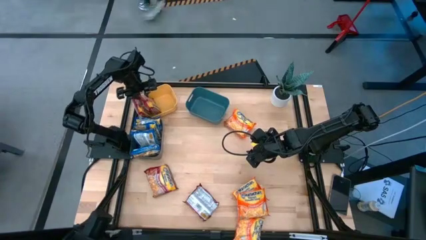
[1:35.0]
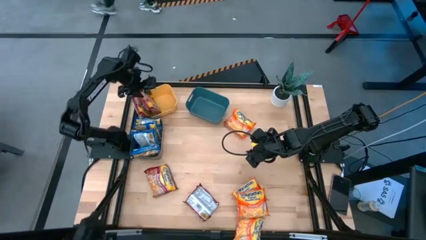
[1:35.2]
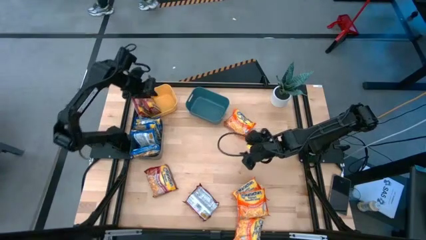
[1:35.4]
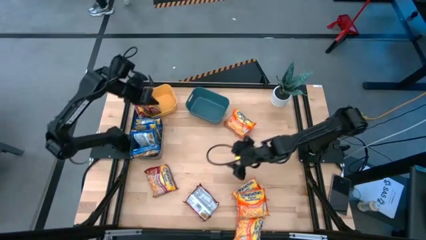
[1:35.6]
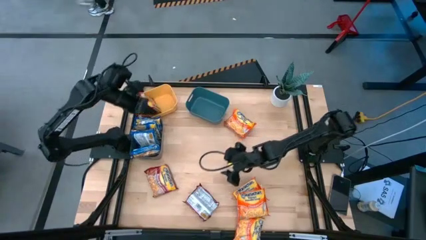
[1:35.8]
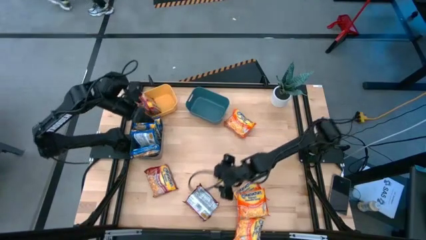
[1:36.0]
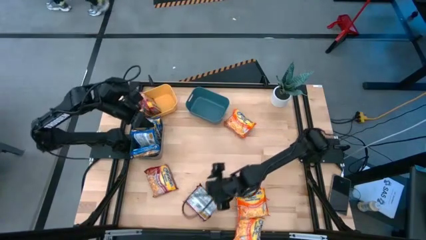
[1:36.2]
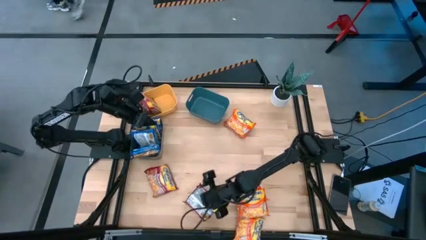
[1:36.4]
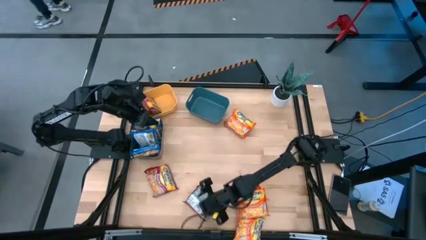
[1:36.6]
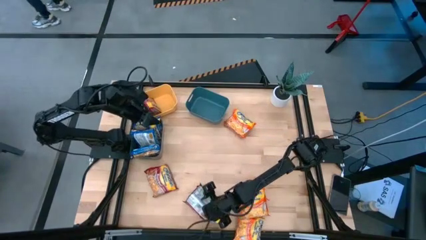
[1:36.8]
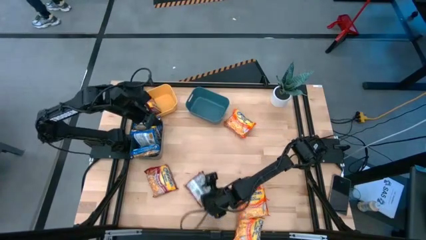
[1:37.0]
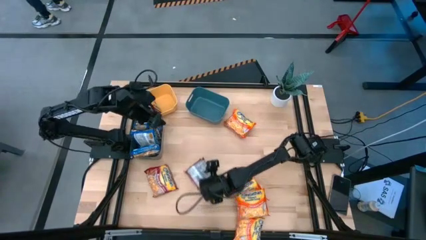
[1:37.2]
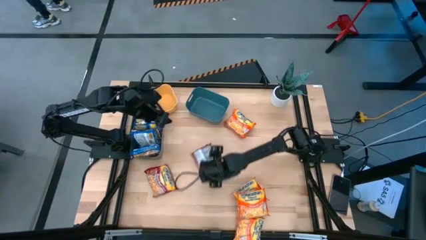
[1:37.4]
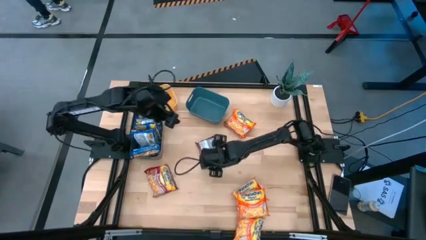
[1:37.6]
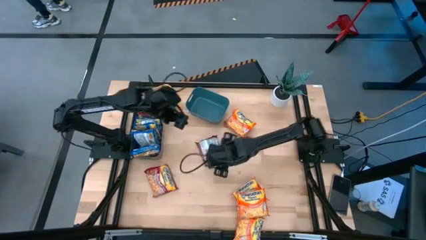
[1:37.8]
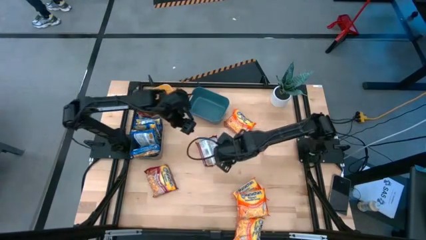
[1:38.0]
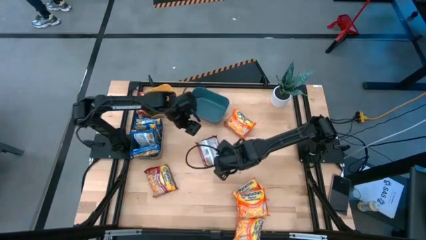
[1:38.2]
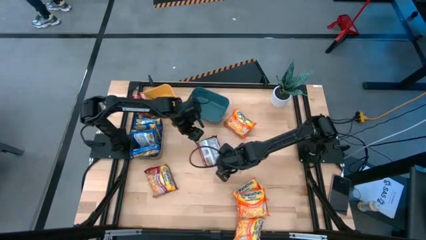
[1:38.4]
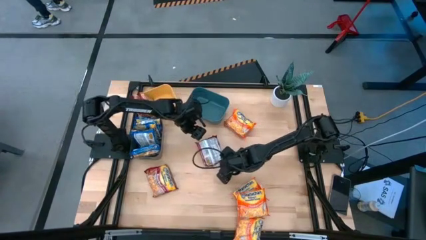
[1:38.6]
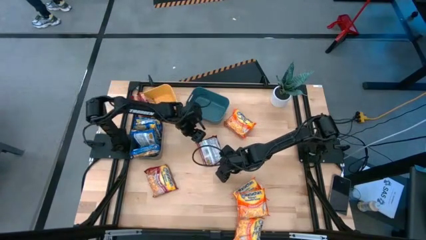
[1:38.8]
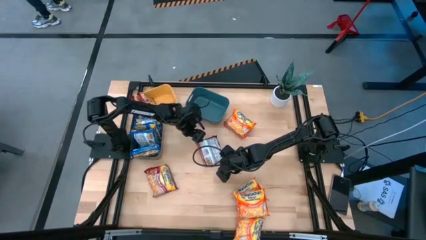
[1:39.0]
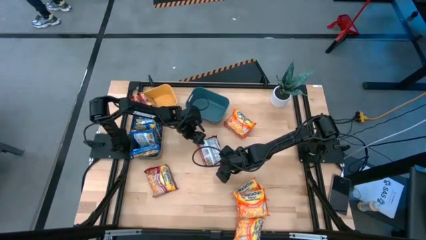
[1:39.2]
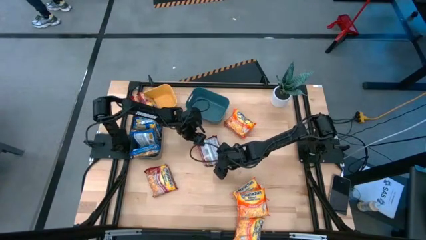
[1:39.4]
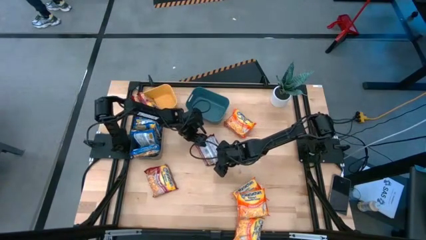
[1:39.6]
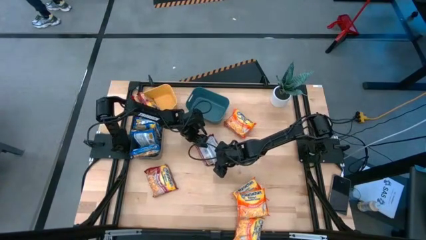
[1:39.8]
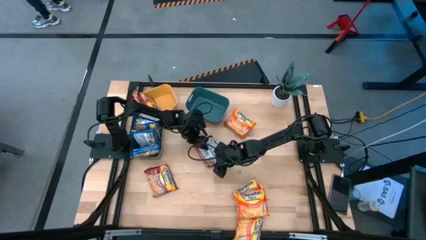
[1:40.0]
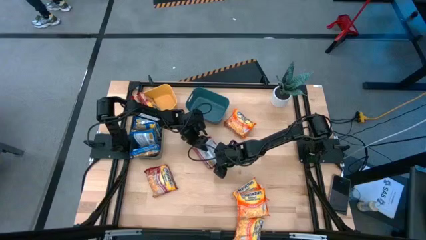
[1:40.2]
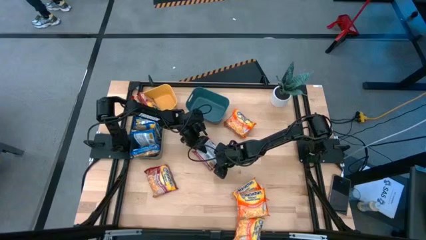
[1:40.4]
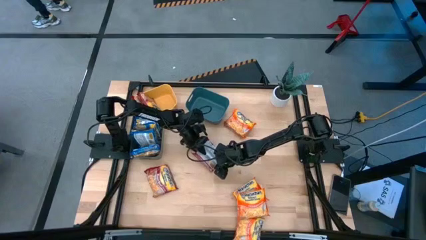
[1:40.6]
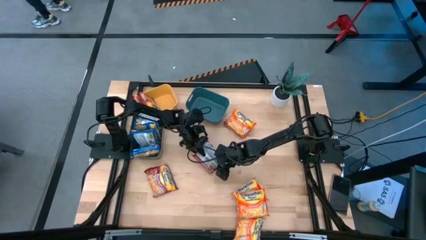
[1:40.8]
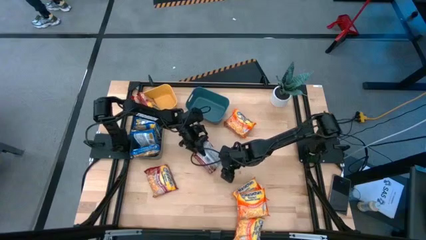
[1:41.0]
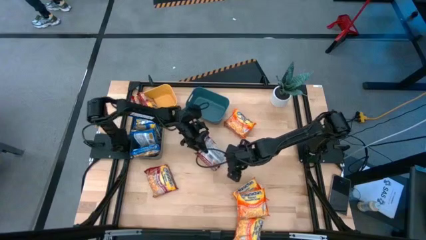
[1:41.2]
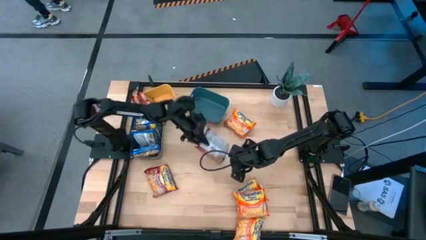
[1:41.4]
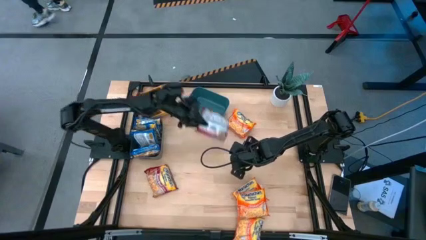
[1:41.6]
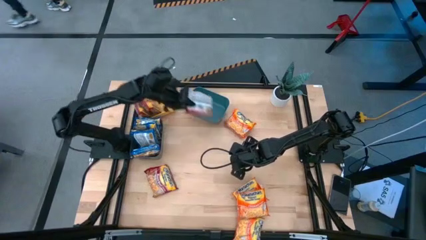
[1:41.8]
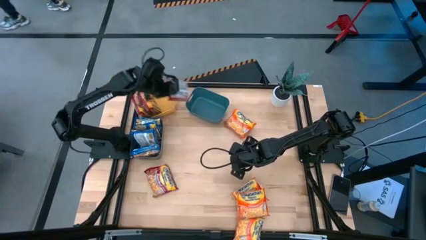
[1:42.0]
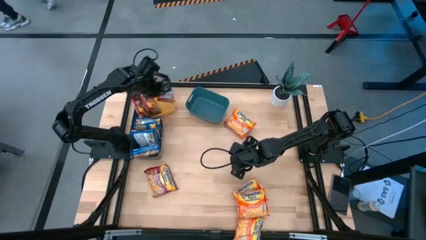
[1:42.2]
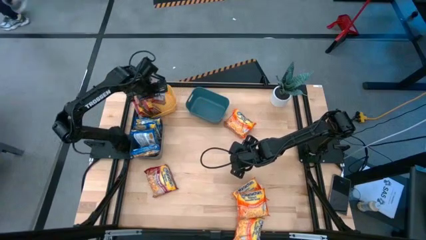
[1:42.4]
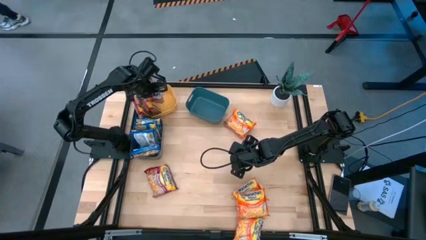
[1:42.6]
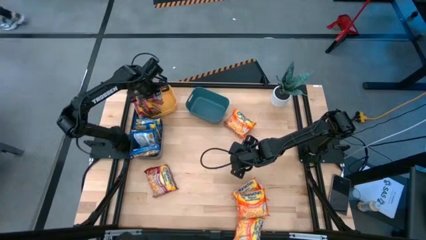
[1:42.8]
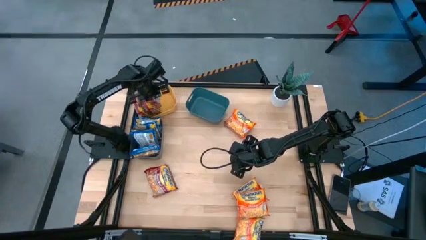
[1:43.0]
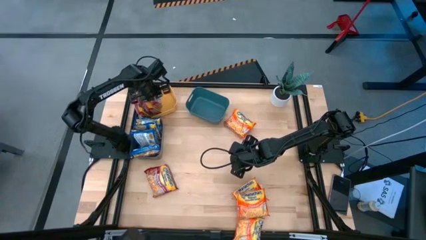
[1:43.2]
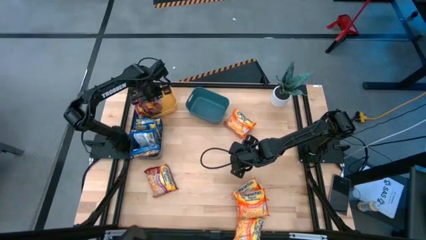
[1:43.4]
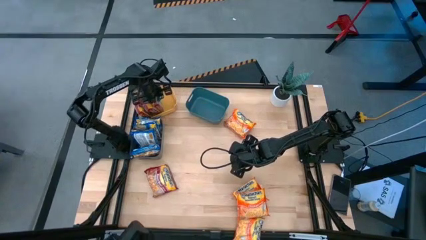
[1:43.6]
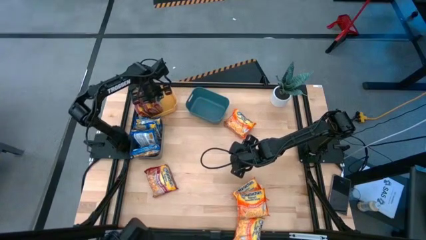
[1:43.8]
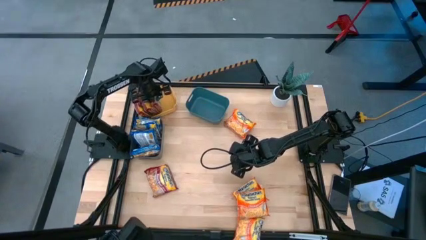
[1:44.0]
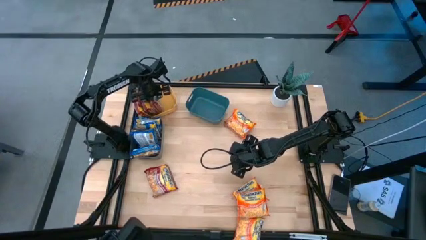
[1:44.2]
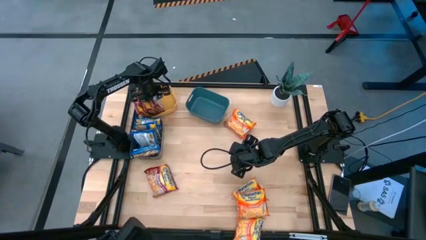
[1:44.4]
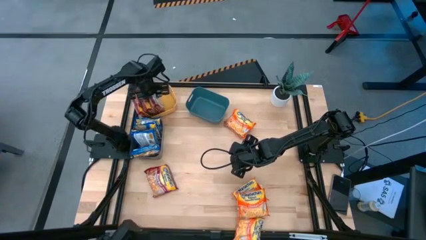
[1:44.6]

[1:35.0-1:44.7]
Task: Sort Maruchan noodles
Put the red noodle pack into the yellow bin

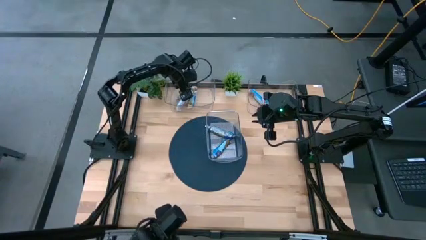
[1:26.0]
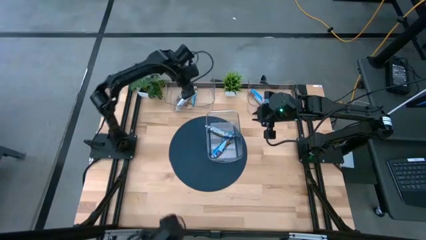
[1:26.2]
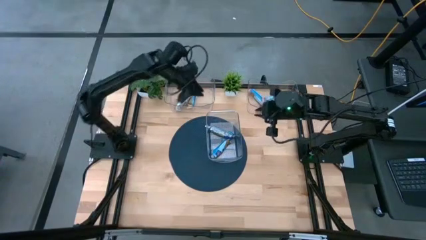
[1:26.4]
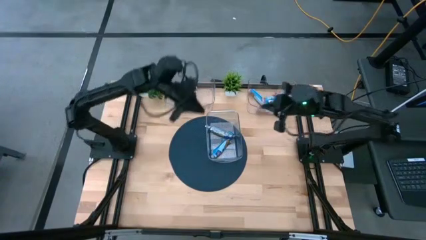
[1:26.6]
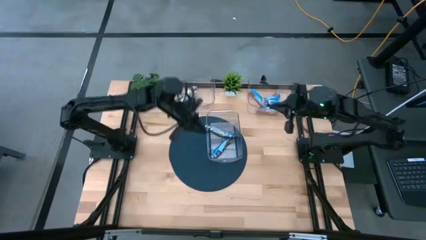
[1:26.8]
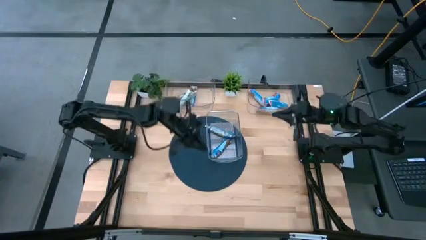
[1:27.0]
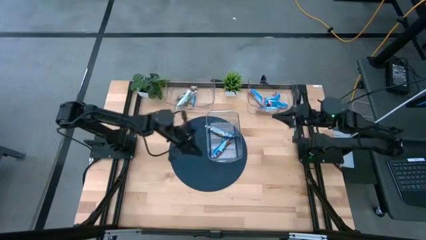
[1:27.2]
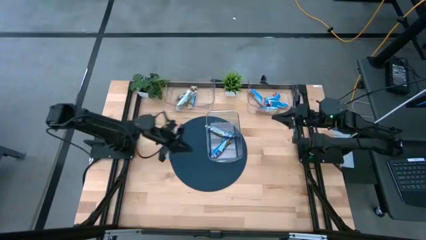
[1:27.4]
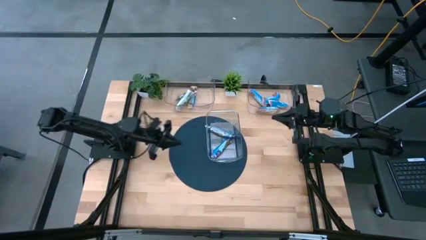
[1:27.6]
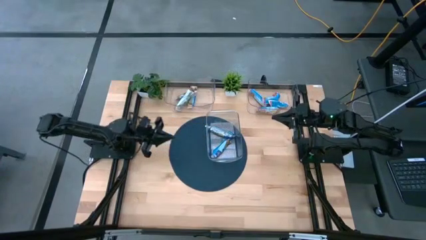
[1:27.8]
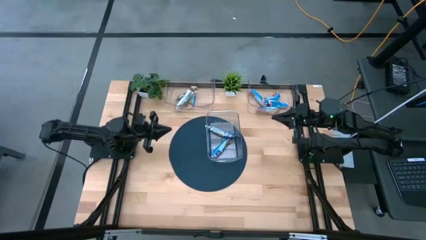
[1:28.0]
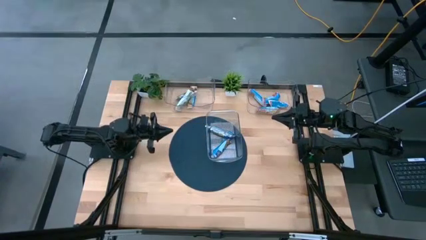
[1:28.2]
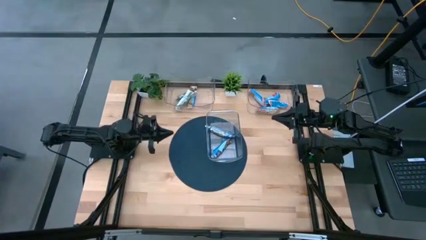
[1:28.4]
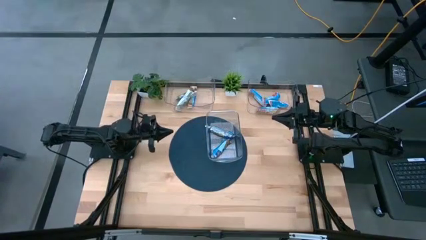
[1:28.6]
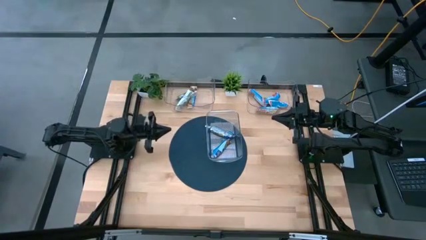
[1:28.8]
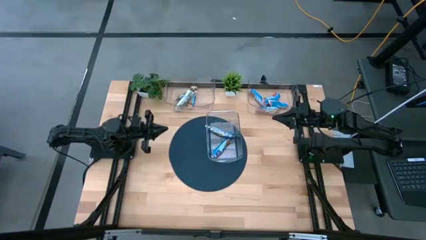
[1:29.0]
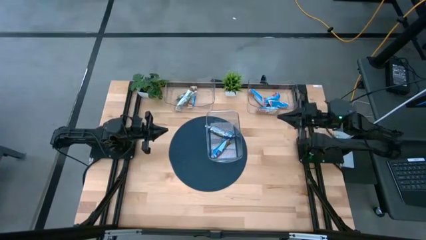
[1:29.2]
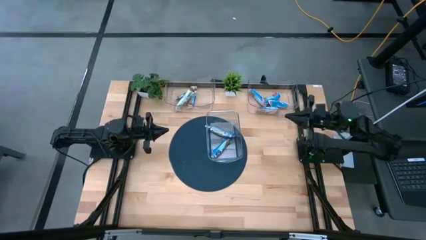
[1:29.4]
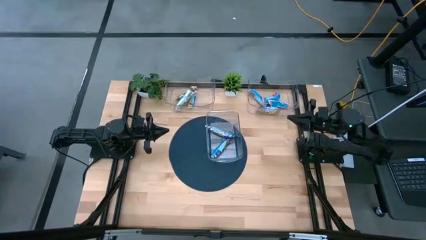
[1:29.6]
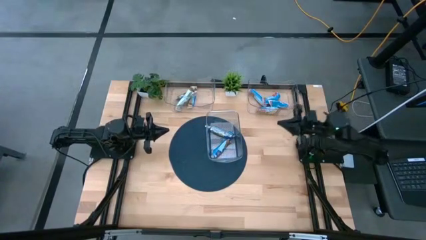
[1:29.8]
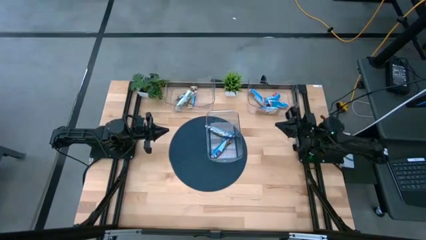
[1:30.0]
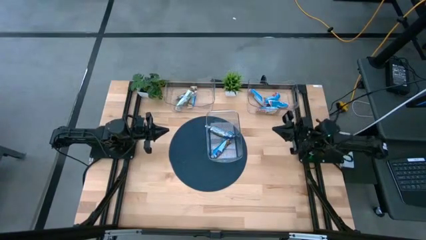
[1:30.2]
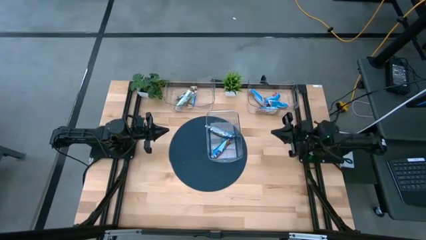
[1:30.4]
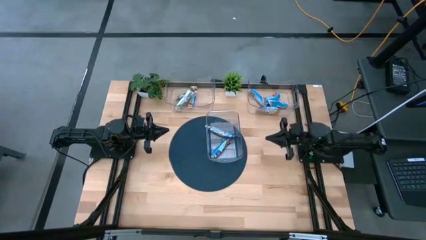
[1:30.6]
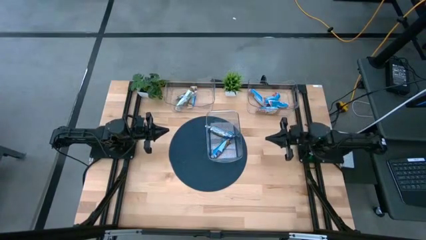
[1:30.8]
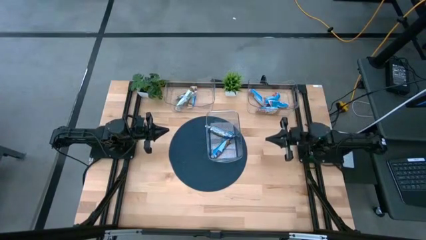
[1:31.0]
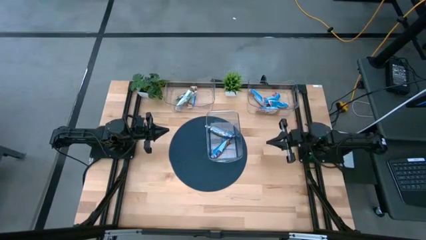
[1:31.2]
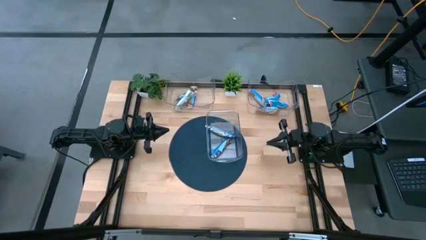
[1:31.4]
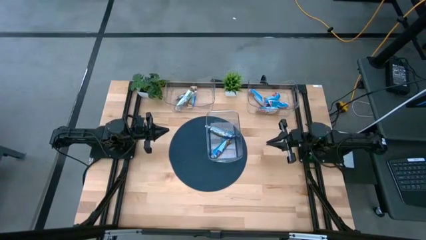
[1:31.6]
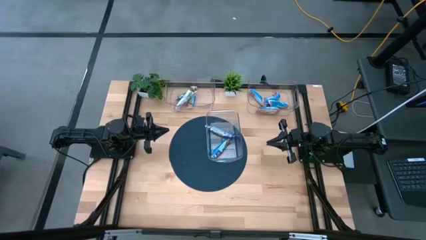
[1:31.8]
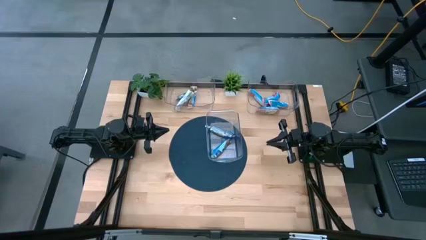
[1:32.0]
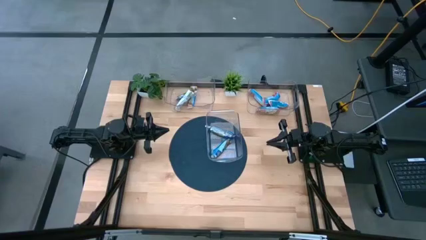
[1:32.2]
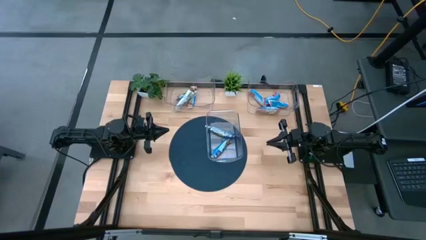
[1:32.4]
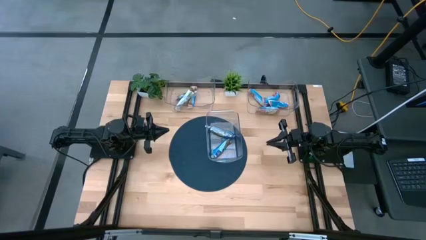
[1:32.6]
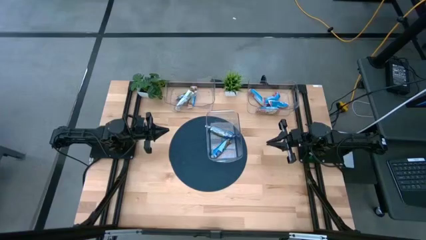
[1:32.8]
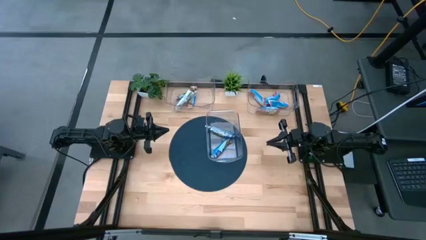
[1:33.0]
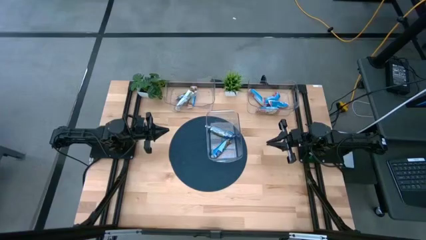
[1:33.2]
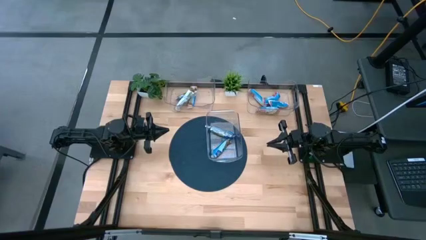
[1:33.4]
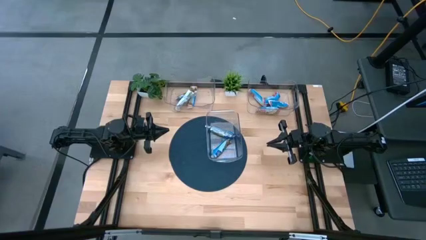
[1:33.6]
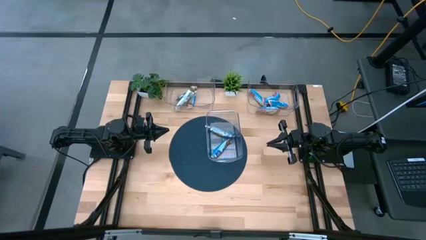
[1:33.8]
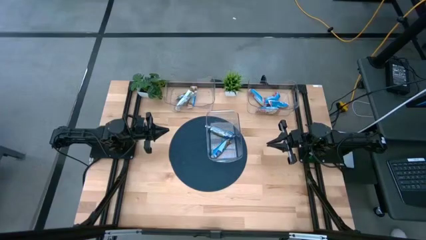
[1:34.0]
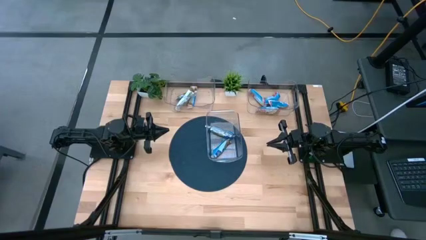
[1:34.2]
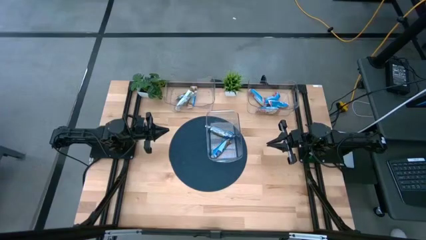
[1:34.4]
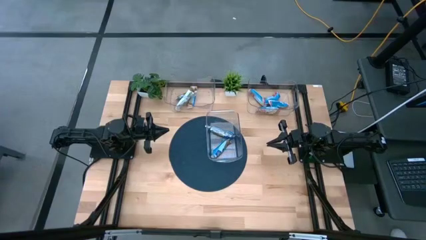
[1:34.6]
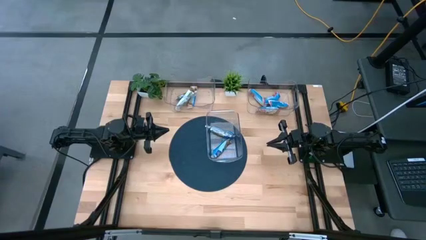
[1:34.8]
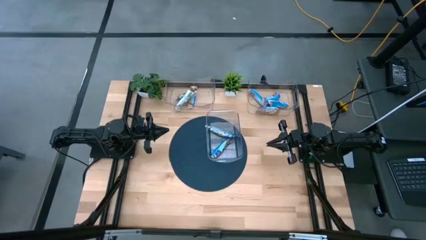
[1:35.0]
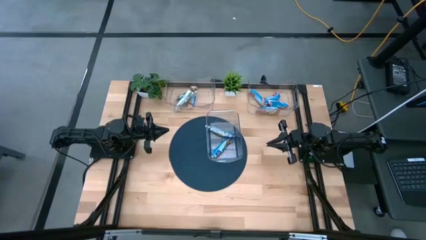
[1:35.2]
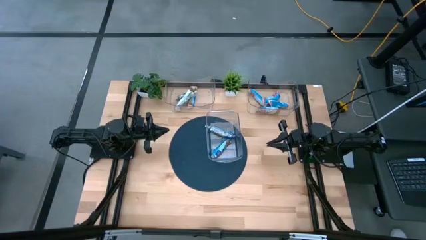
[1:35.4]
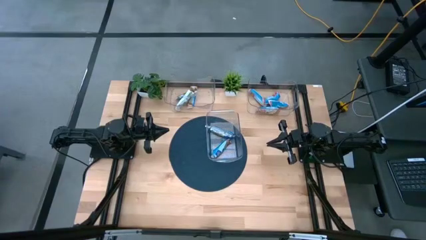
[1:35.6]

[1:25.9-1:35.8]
Task: Pick and place Granola Bars by type
Return to Home Position
